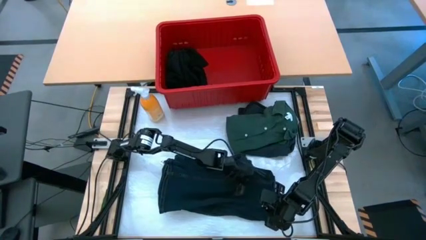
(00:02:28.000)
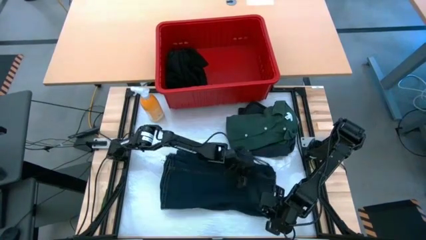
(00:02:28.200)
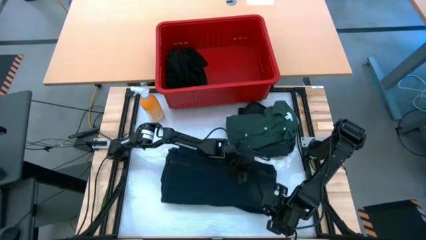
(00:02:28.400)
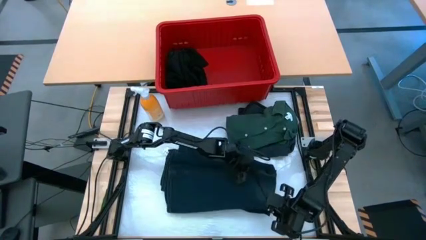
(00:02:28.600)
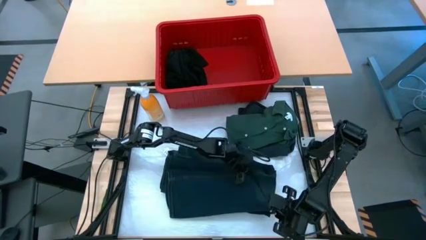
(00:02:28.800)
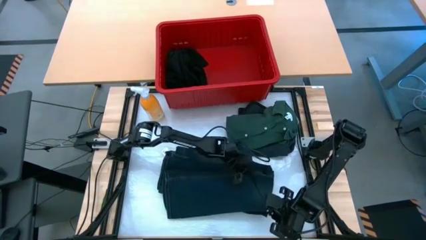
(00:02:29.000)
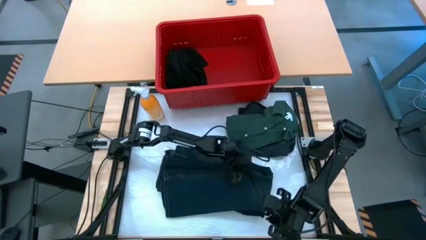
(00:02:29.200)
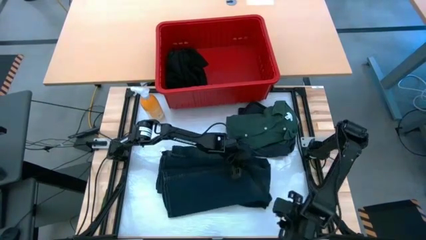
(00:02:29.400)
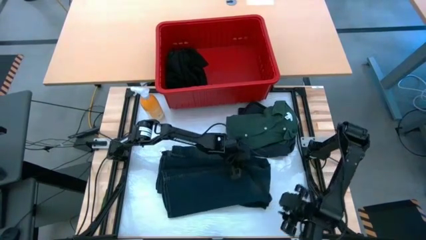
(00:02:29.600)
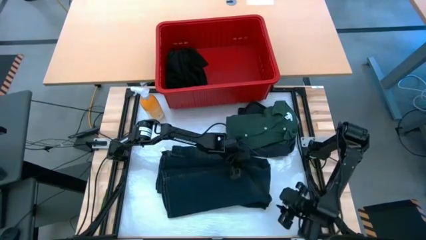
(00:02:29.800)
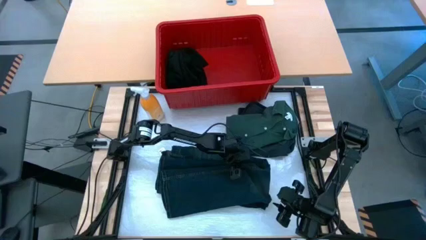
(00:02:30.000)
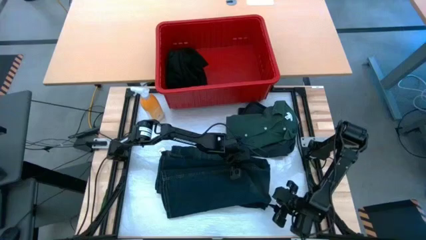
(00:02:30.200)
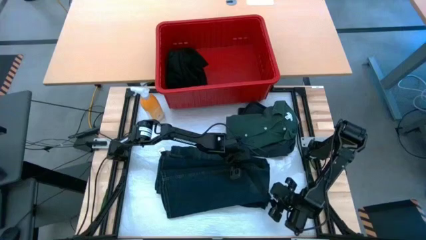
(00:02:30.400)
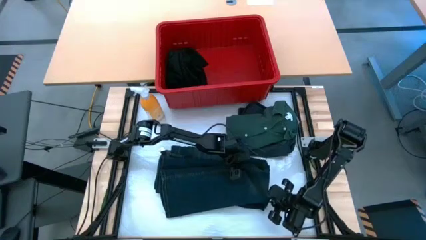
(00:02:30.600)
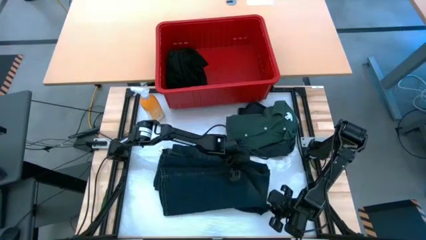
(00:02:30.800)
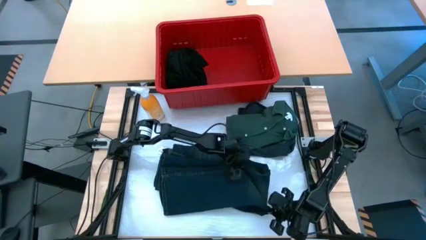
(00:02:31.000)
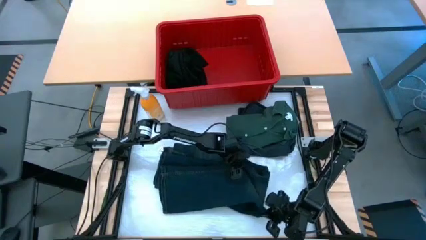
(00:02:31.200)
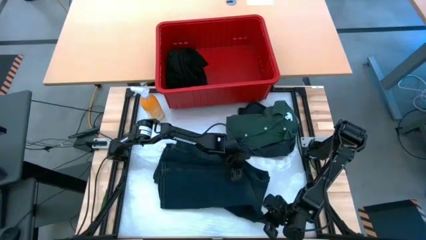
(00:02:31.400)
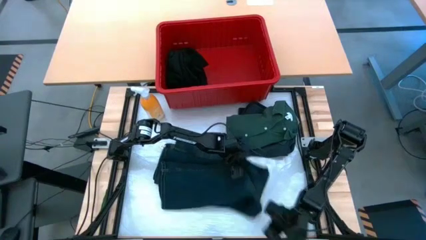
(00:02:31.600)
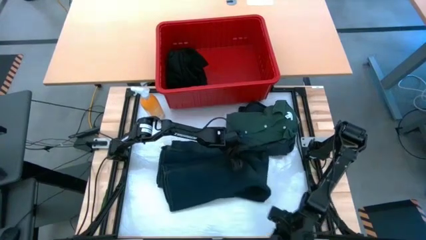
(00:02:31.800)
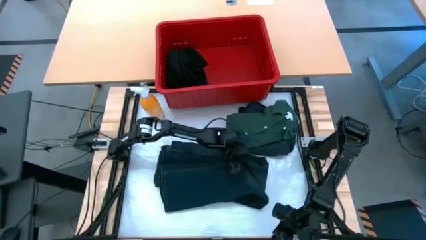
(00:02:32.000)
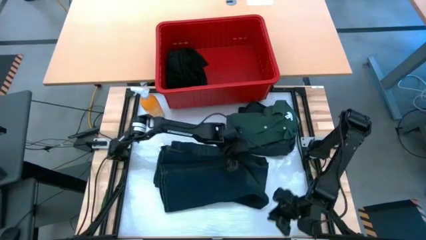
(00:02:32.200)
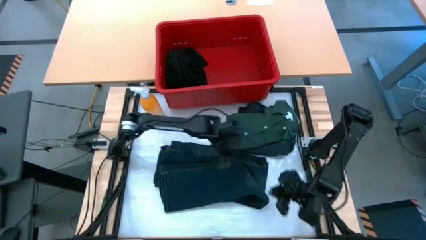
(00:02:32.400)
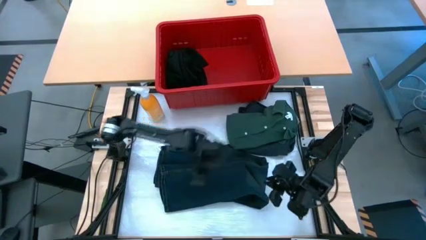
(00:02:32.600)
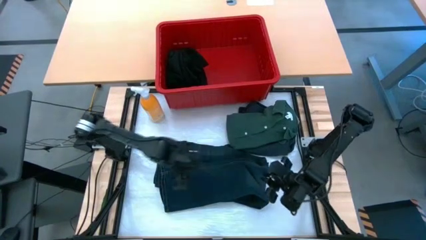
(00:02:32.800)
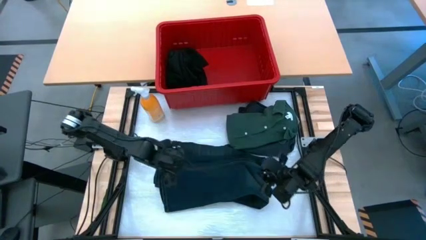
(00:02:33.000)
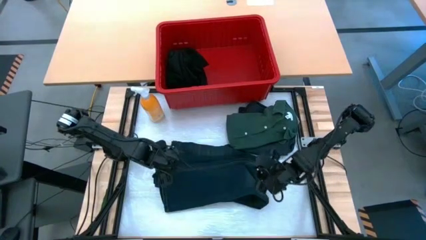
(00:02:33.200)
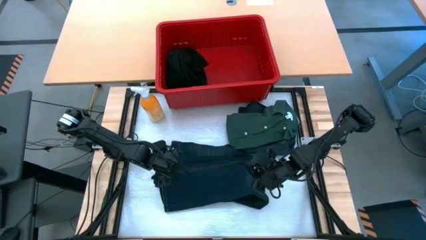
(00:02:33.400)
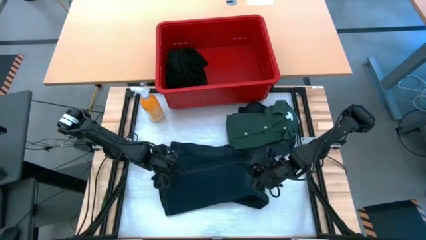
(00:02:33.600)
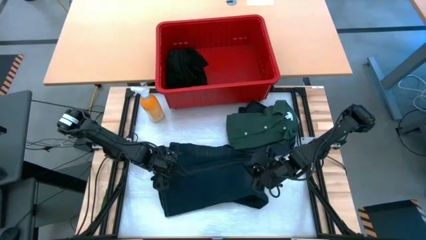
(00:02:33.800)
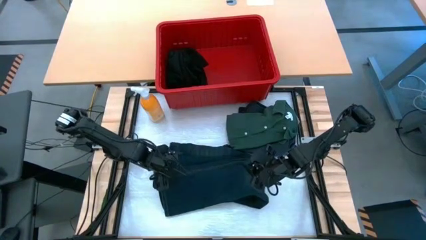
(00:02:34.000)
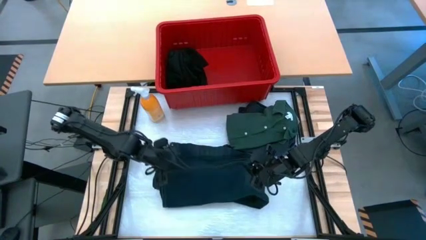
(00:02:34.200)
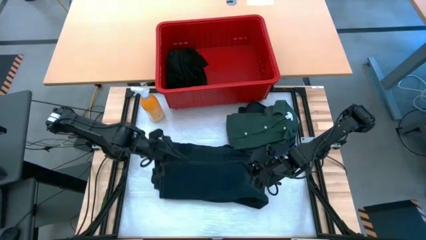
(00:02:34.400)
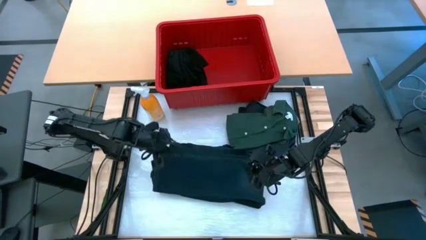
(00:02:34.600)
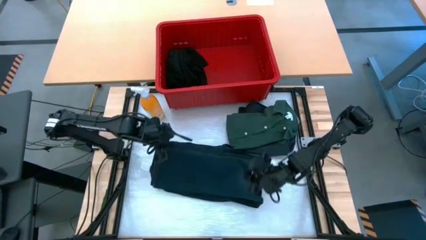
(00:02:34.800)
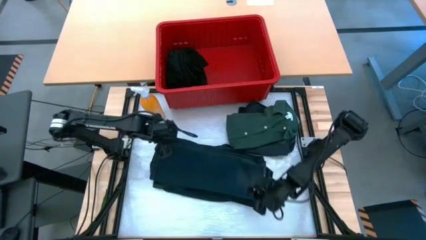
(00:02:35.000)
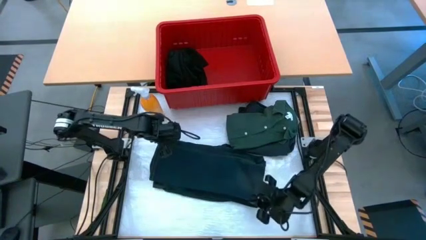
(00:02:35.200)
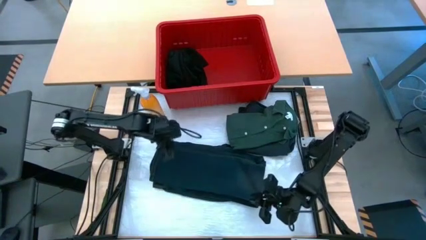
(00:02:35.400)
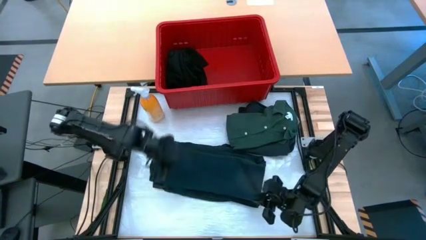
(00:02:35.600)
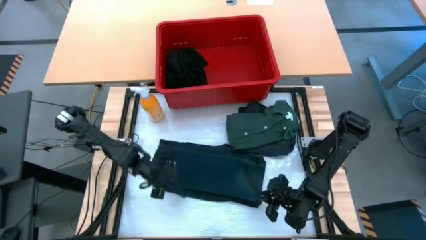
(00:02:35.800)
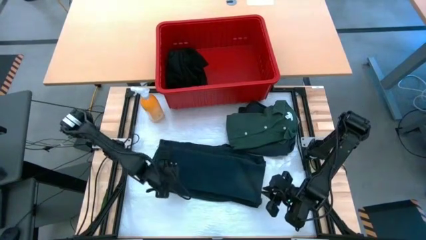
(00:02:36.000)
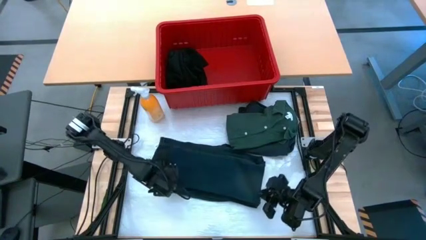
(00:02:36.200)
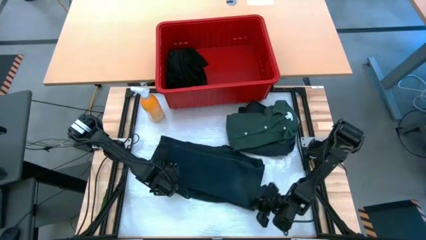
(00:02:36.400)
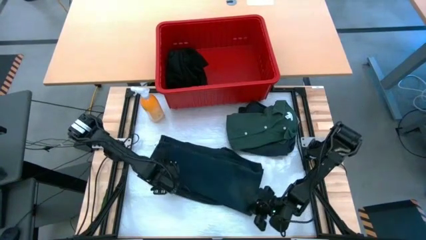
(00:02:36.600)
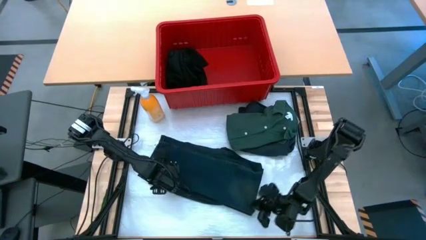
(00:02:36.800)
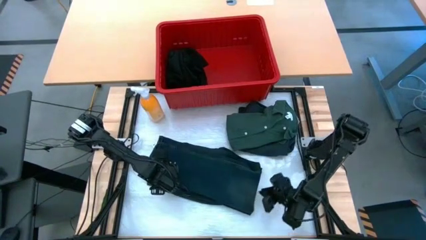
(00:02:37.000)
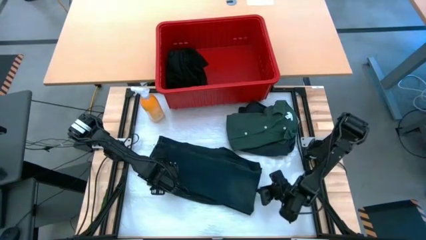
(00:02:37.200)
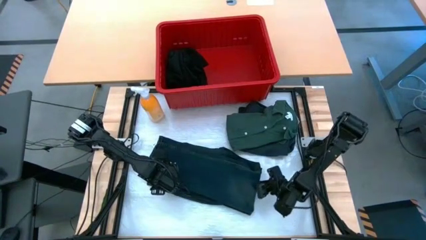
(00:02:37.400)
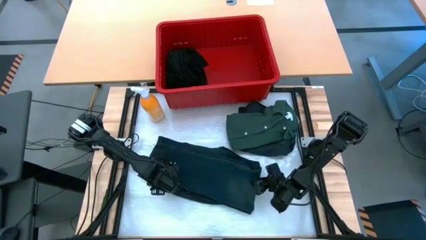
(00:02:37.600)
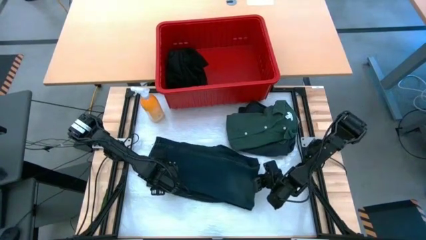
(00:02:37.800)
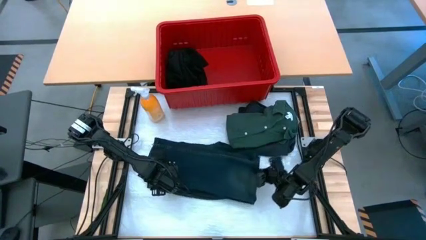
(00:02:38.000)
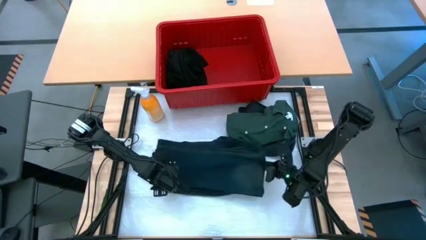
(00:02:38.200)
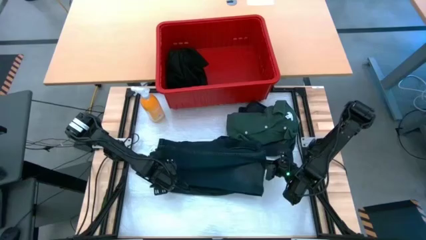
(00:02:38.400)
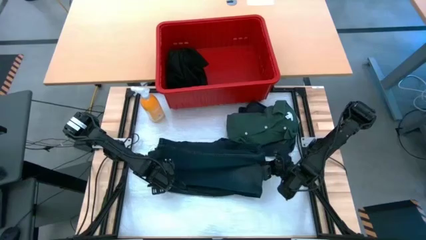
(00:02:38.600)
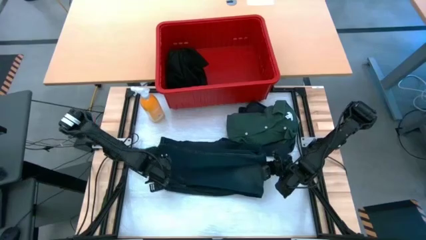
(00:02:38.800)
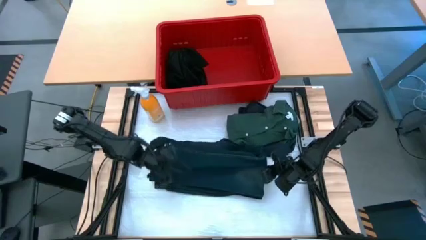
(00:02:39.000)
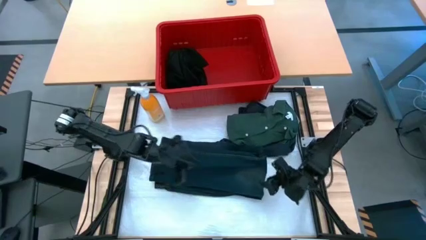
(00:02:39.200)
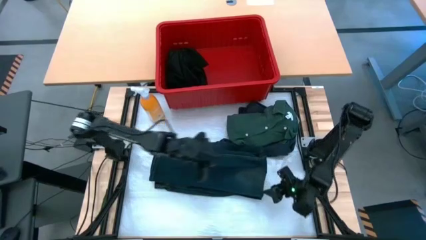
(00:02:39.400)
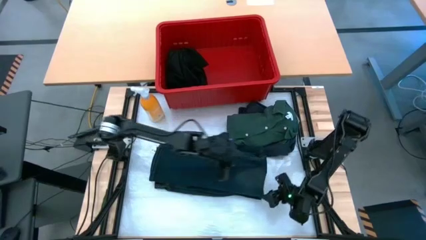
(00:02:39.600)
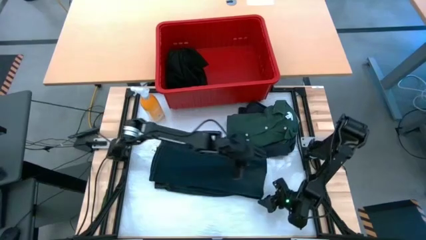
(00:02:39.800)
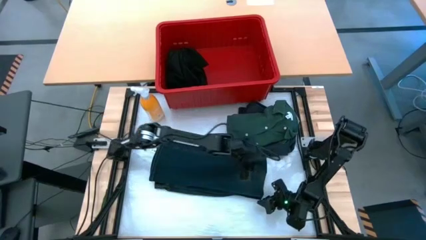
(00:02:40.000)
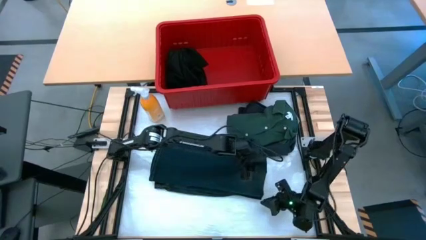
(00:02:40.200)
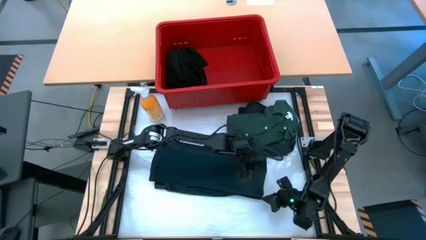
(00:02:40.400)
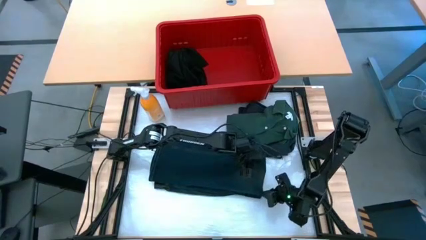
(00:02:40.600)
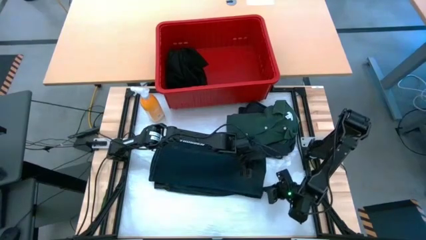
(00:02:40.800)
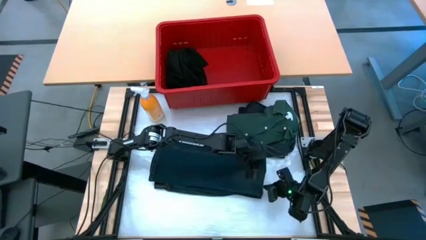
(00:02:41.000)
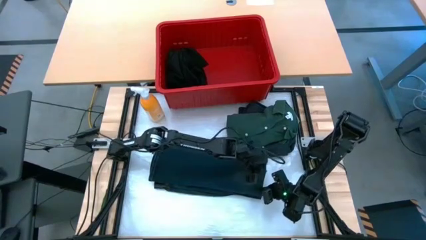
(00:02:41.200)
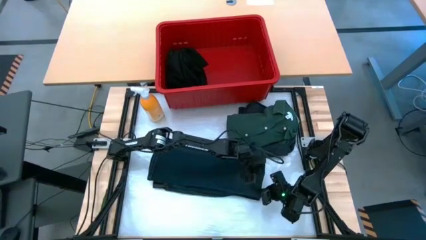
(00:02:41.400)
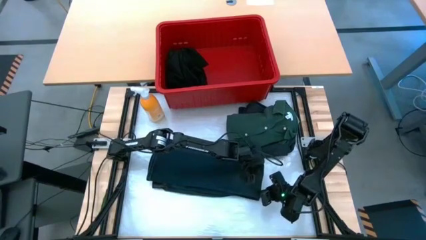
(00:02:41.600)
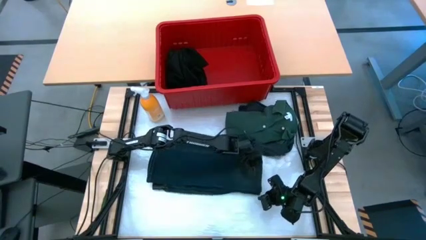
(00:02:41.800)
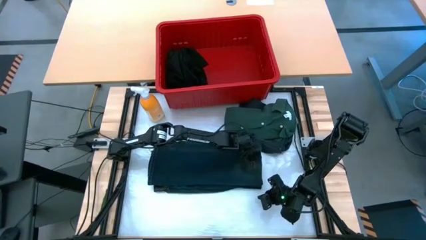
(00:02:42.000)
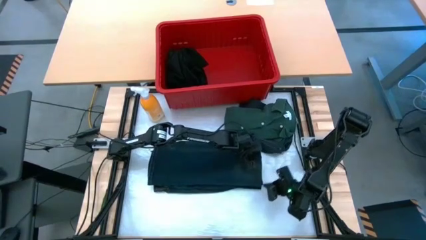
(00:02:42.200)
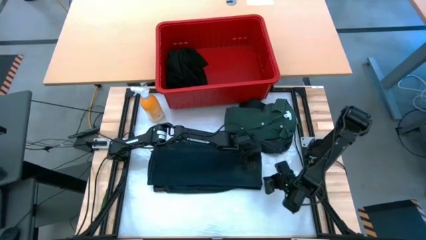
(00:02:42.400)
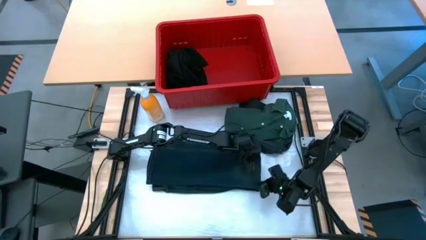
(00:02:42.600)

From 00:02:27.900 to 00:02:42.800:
Task: Fold Laundry from Bin
Fold the blue pants from the bin
